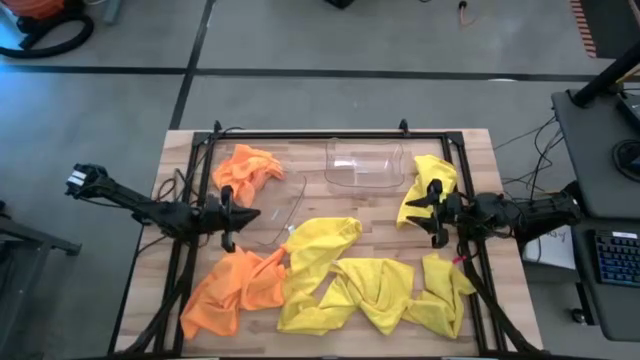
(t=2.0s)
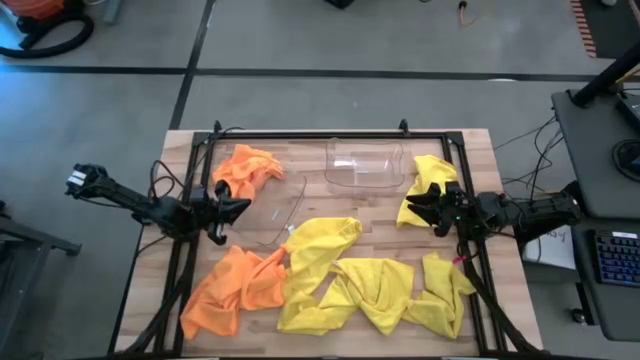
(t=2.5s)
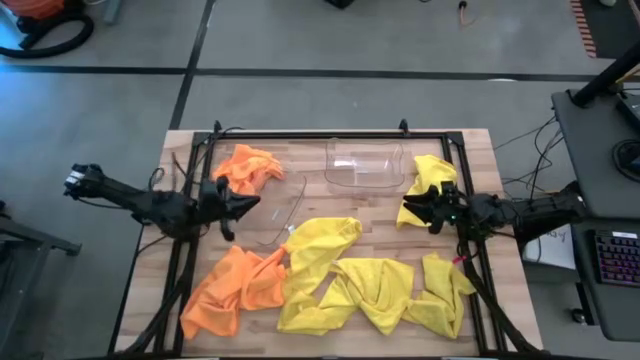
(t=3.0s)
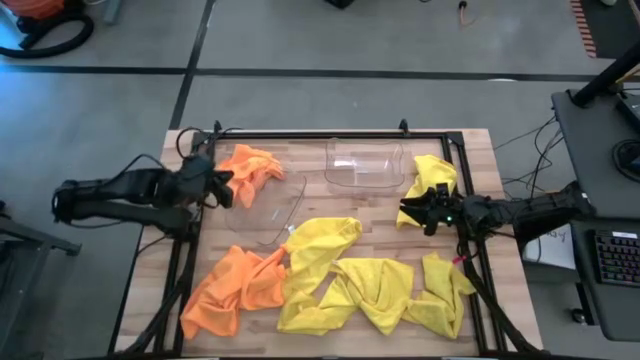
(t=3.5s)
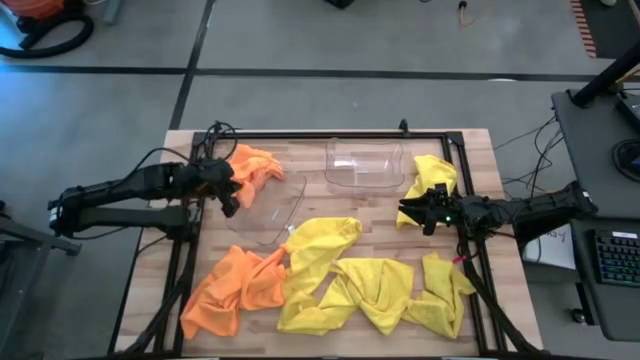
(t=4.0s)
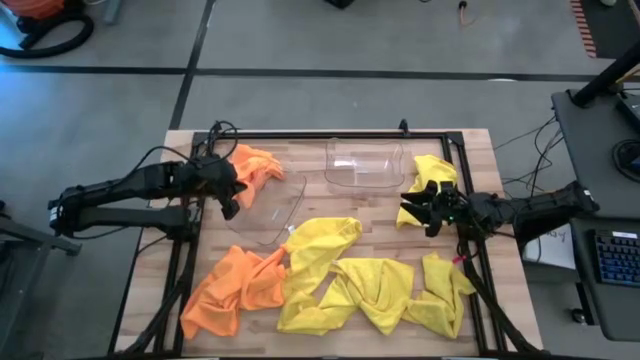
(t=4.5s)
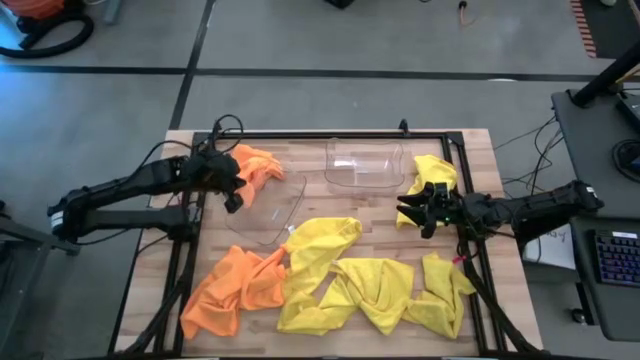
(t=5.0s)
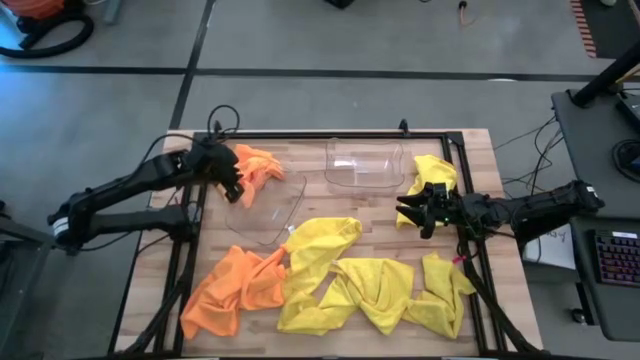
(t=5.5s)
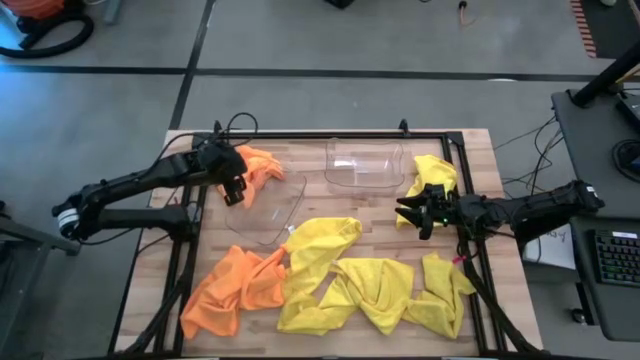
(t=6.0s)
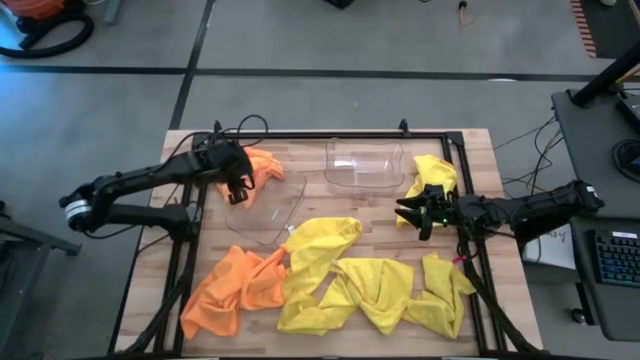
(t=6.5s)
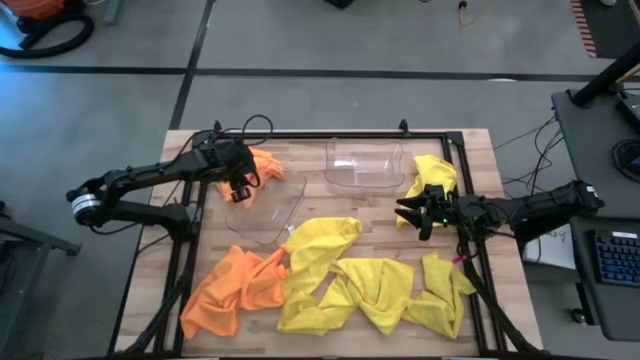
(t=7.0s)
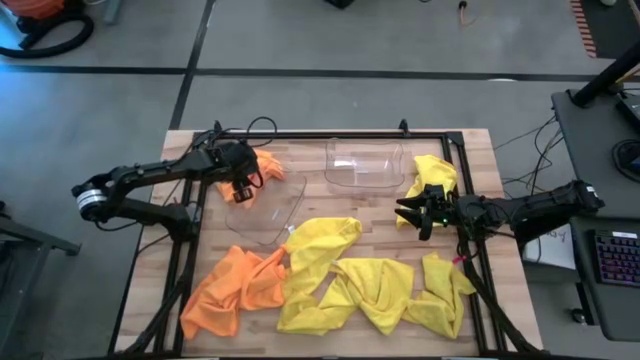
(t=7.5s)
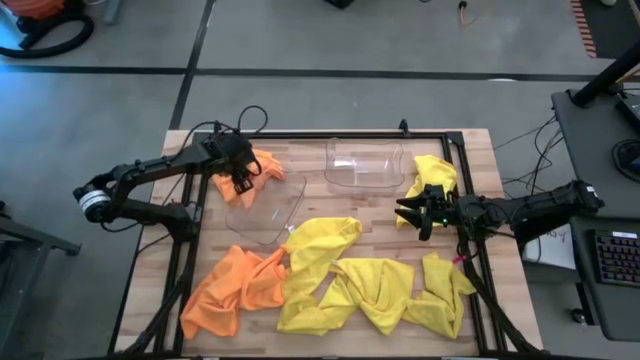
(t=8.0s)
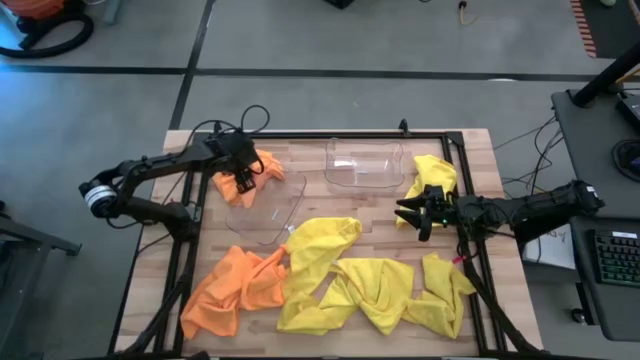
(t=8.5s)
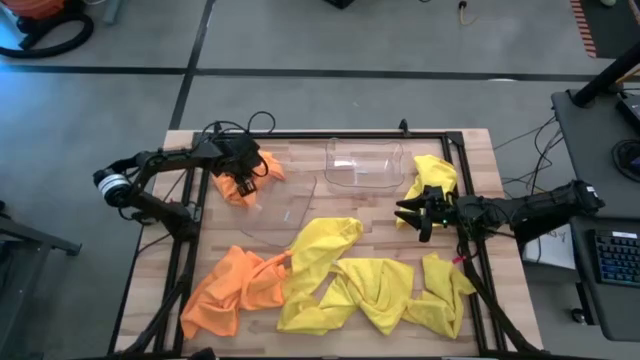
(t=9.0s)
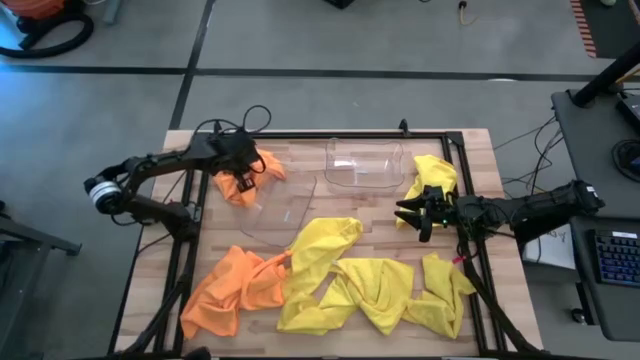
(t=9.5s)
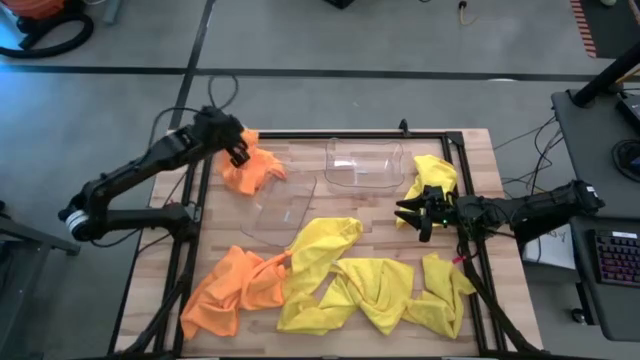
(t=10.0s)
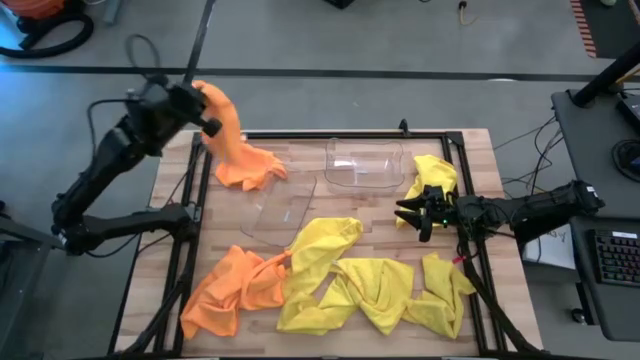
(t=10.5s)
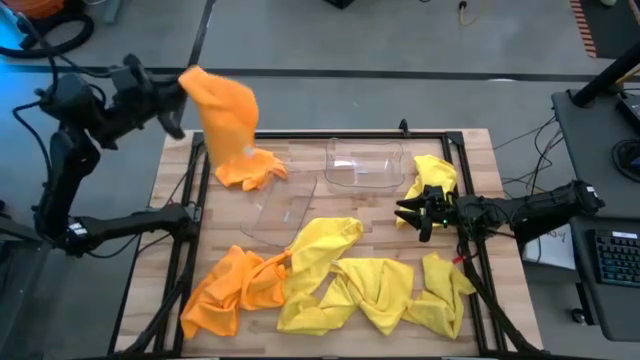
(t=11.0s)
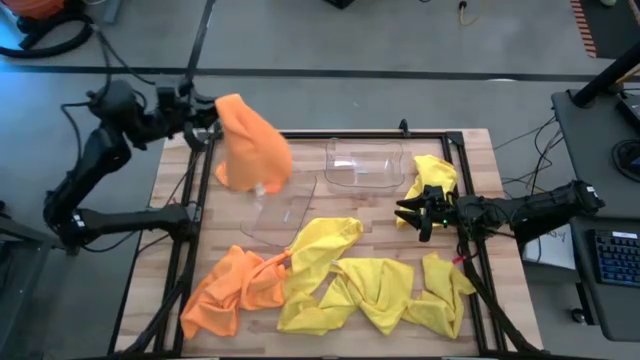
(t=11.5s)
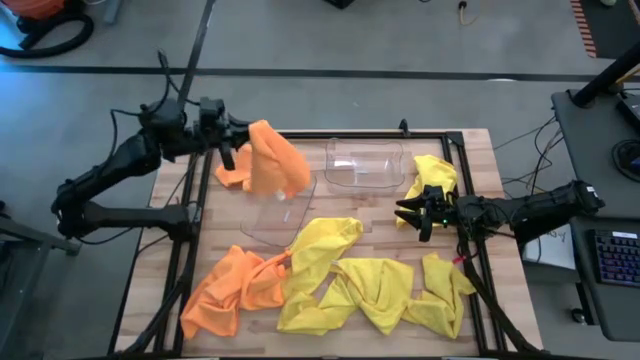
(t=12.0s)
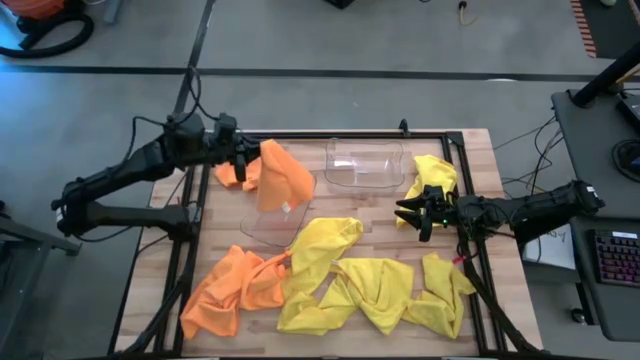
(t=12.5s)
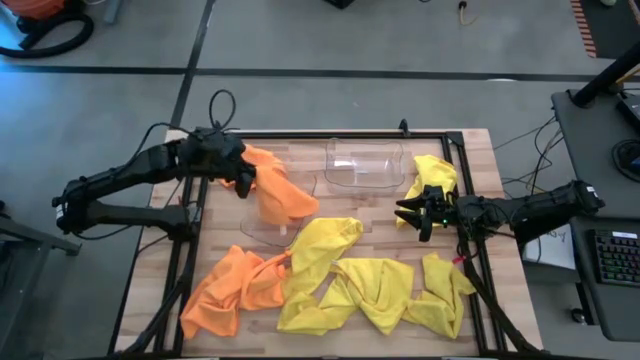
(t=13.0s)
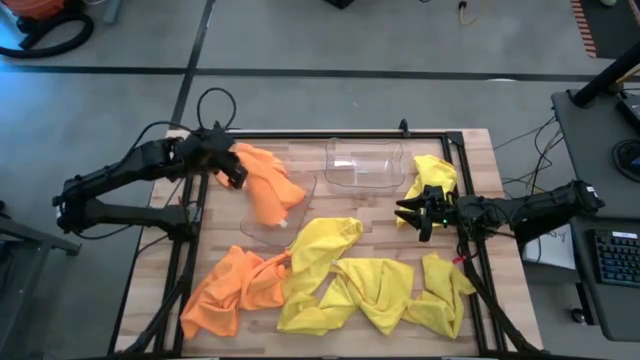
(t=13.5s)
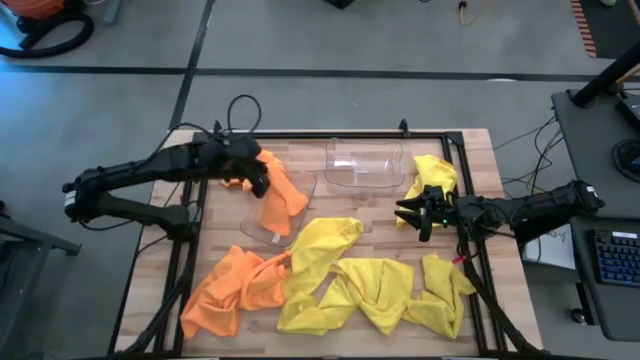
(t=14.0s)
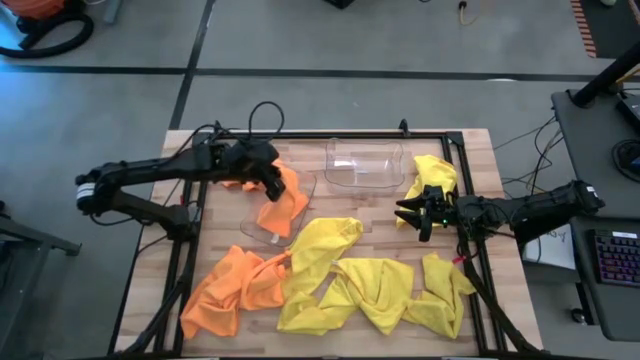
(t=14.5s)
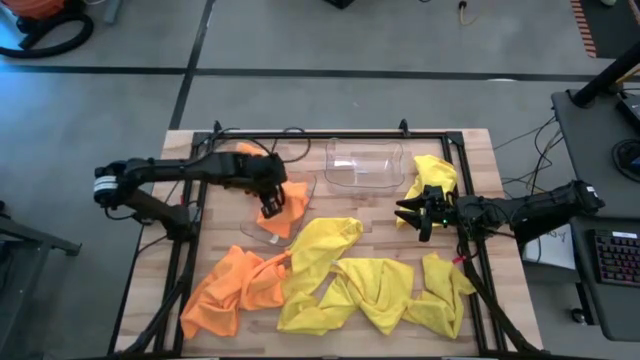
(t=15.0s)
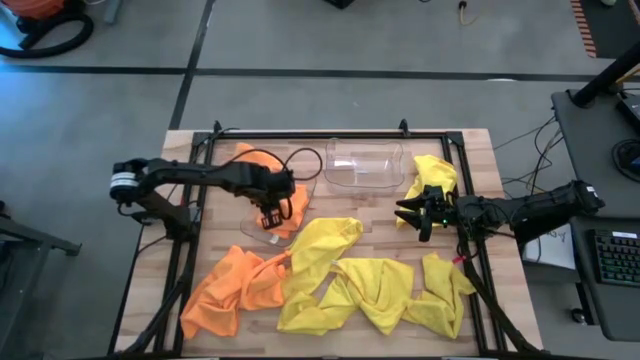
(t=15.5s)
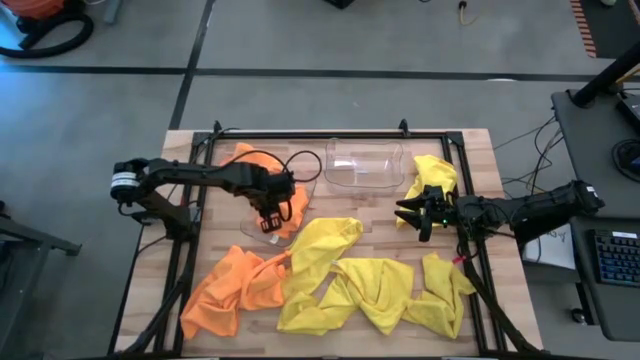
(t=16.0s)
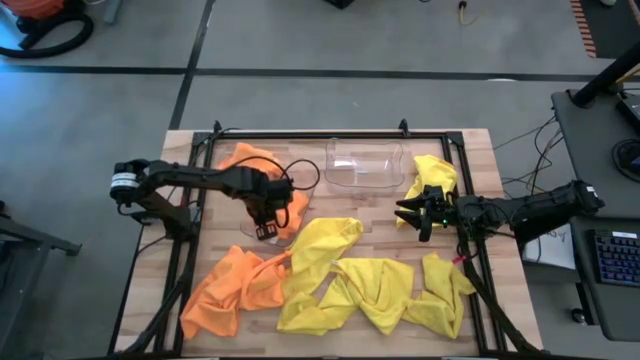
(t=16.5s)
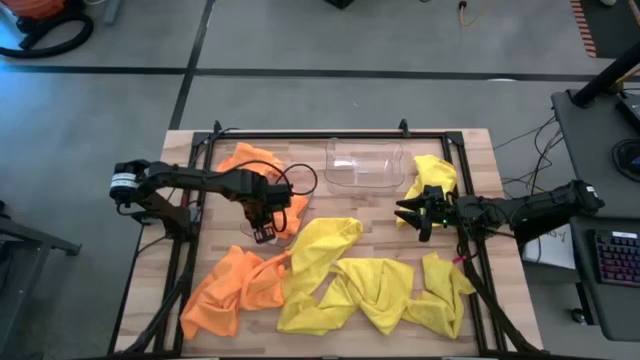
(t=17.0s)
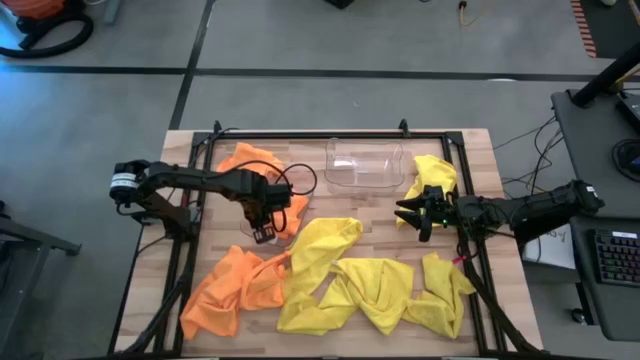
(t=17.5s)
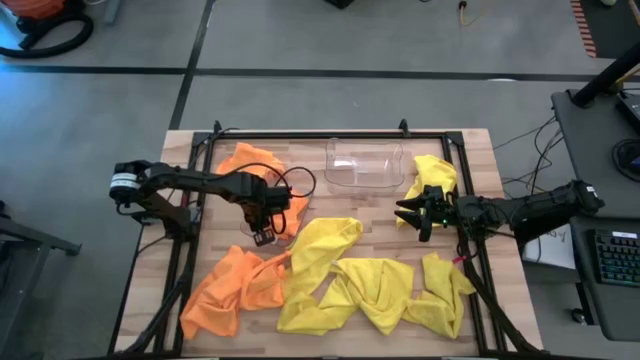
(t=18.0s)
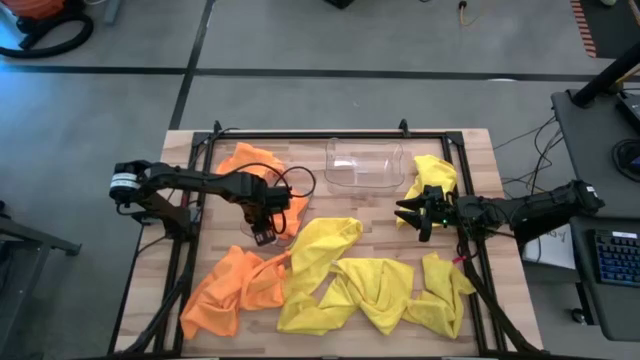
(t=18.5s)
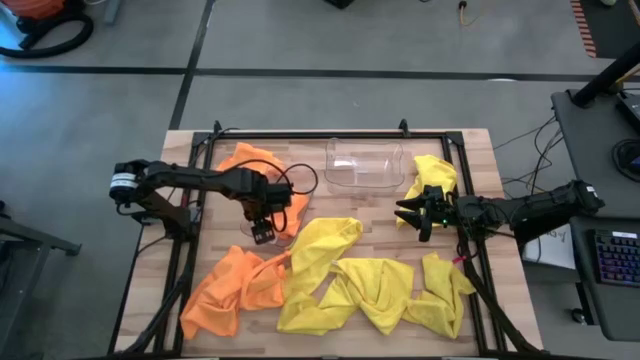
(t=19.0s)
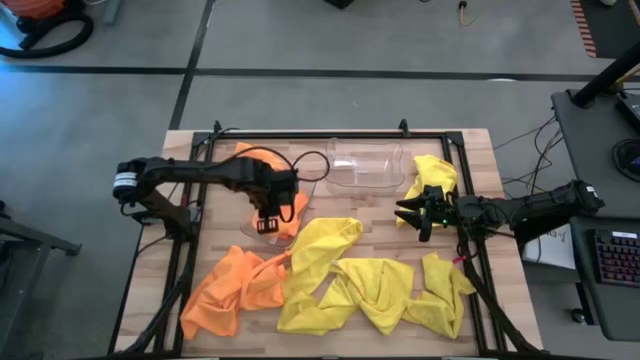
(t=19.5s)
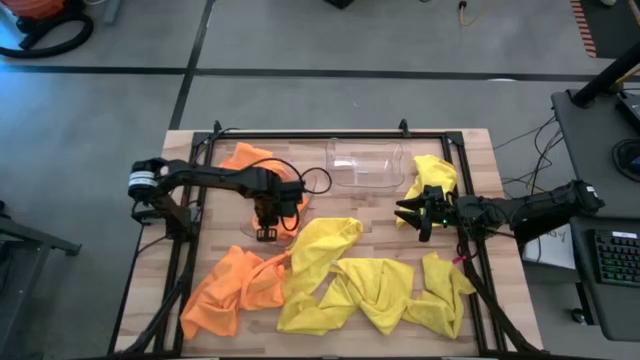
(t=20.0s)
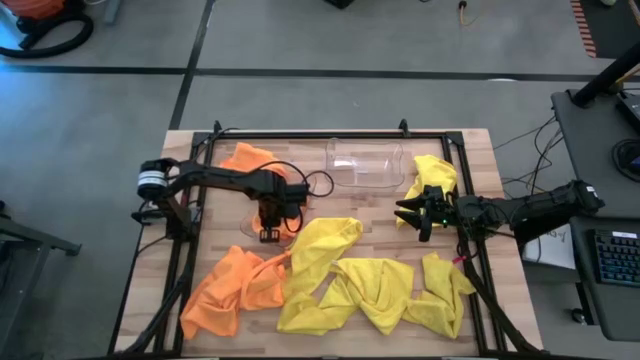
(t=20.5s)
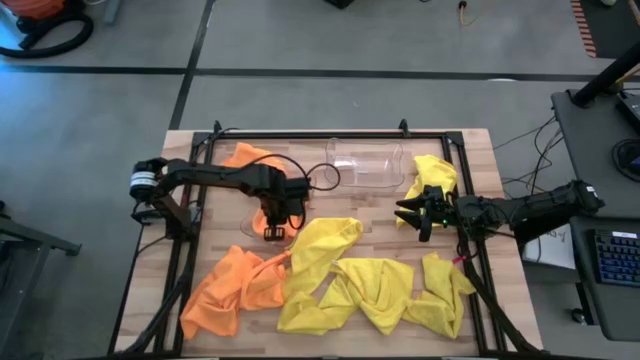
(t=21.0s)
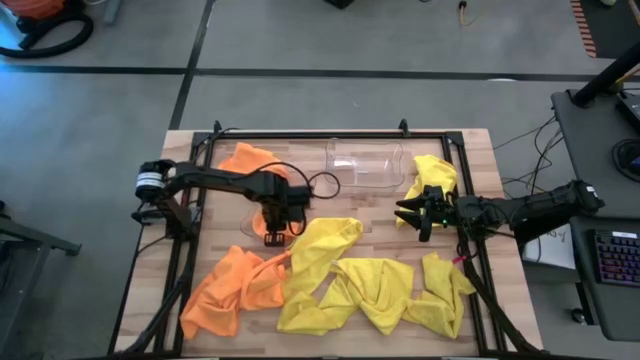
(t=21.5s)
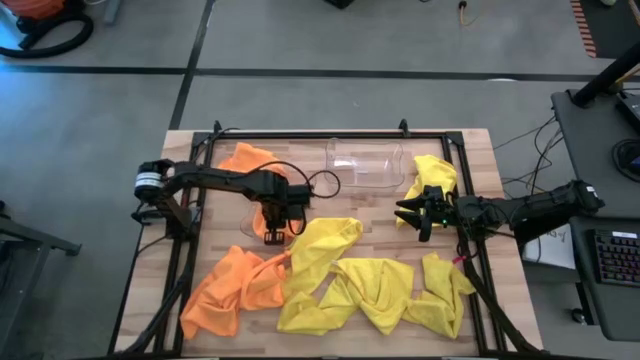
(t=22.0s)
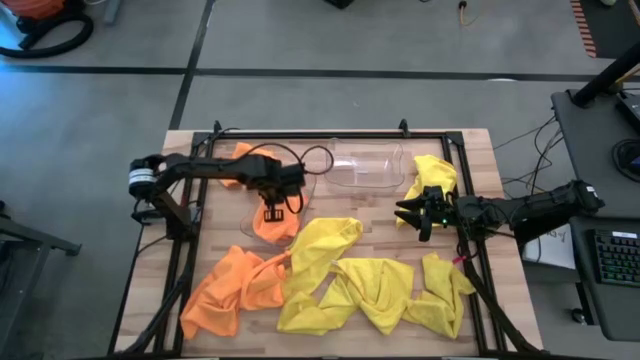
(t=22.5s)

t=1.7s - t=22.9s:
Task: Sort microfiber towel by color & place in baskets
Put the orange microfiber towel into the left transparent bin
